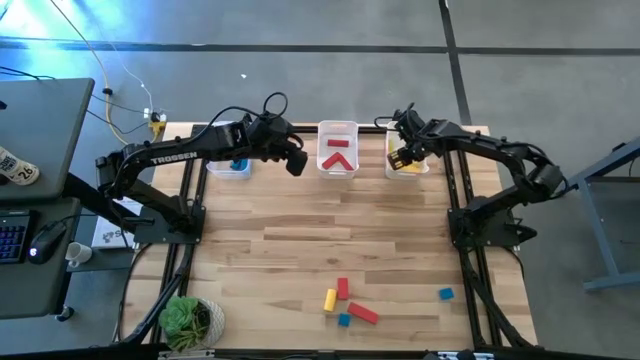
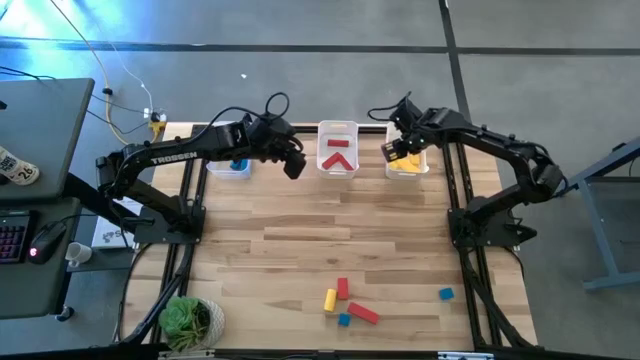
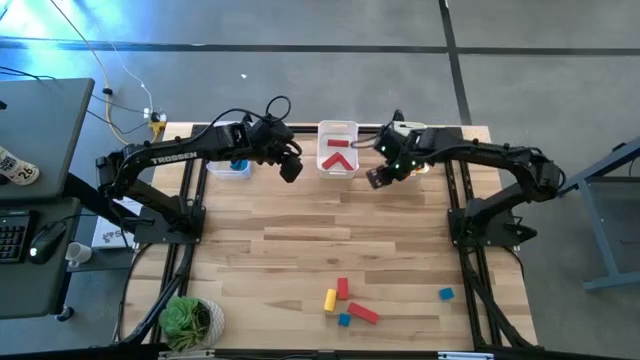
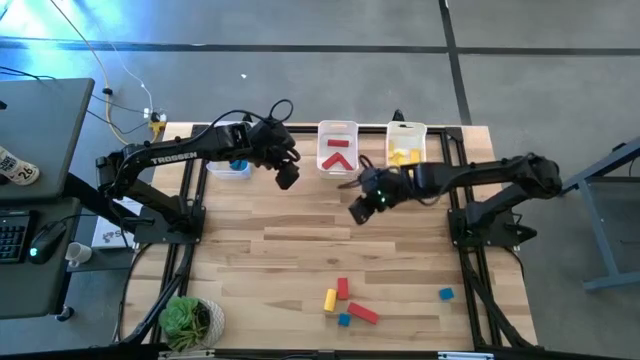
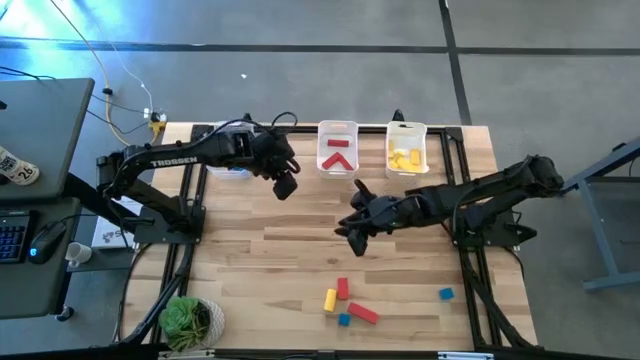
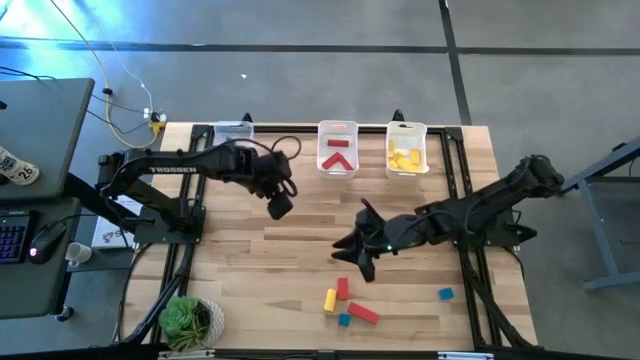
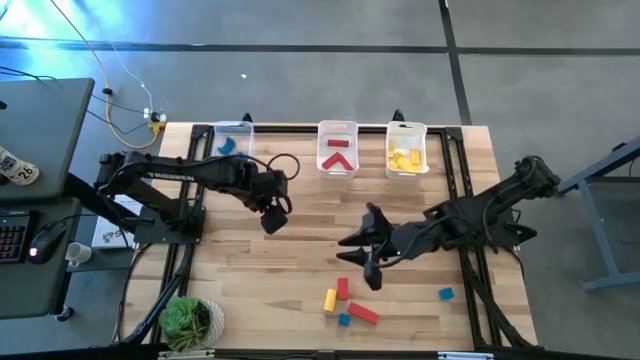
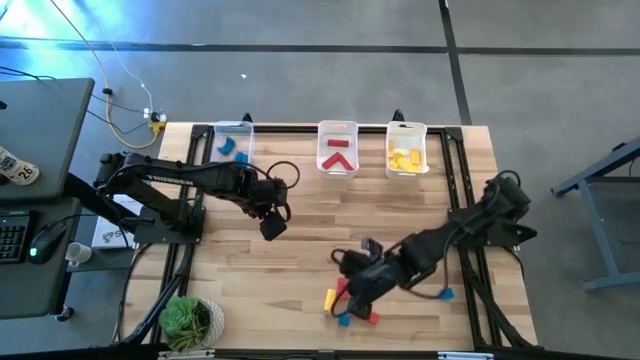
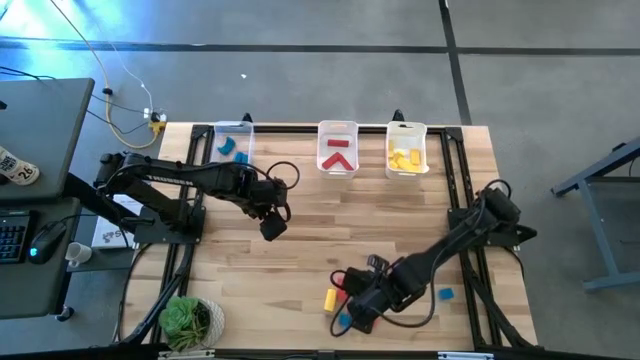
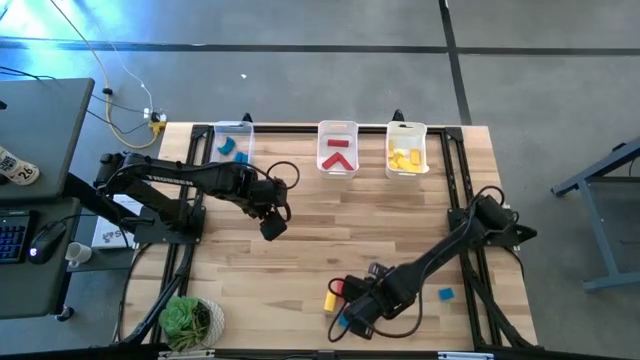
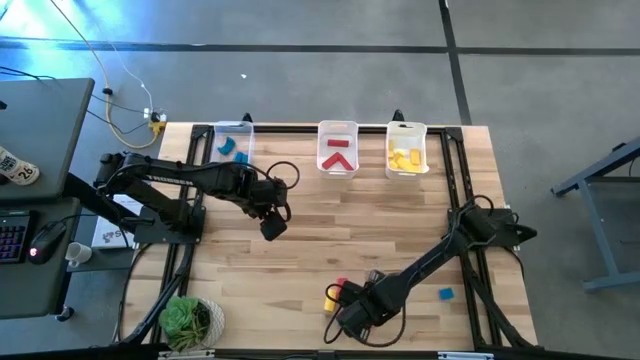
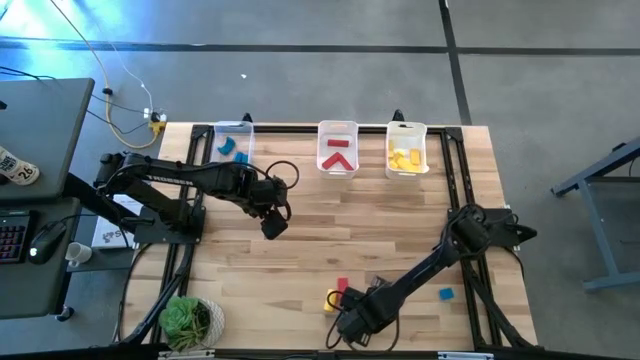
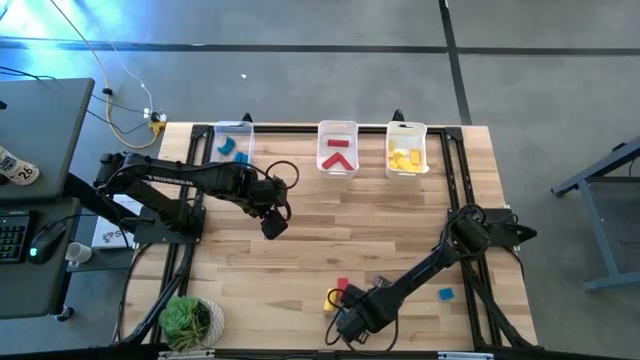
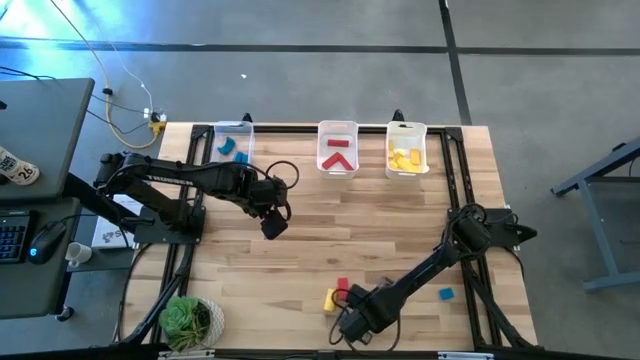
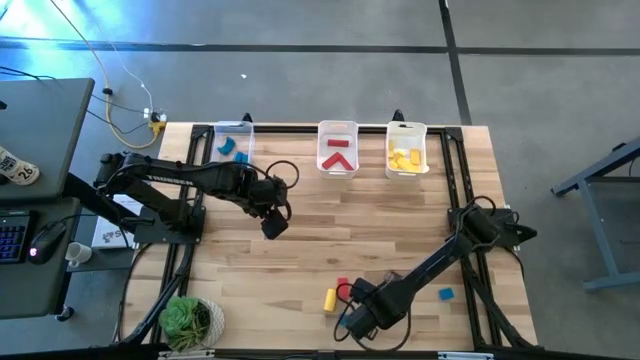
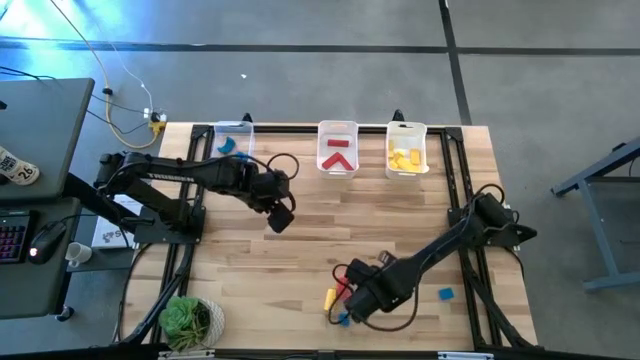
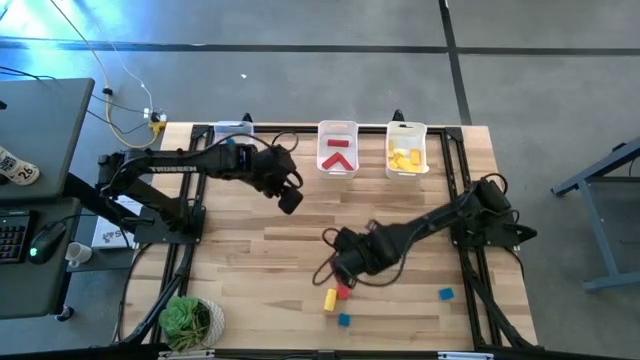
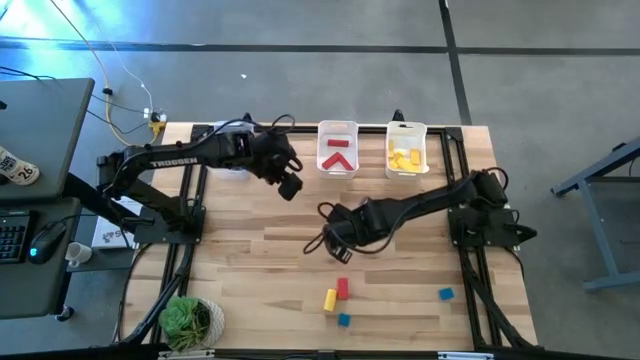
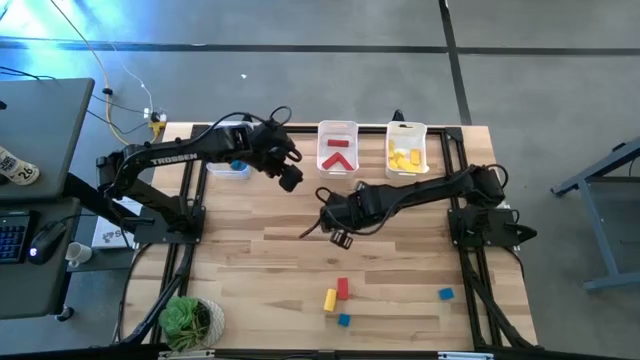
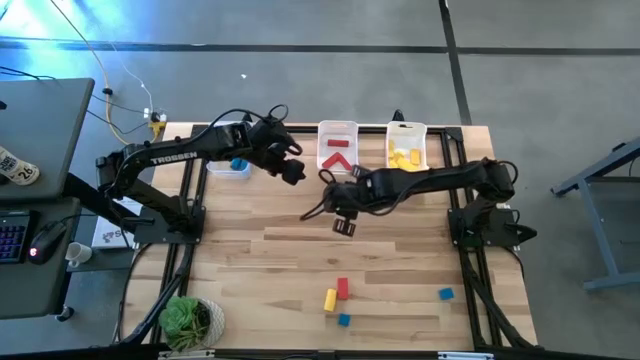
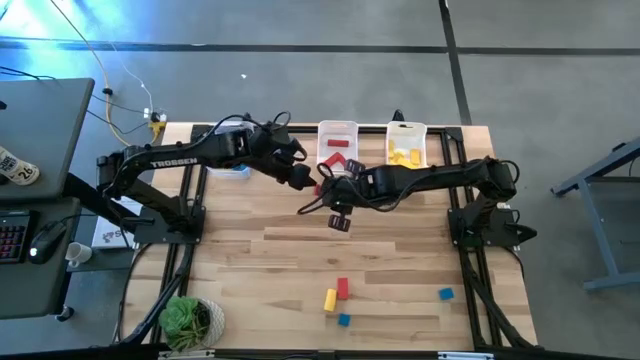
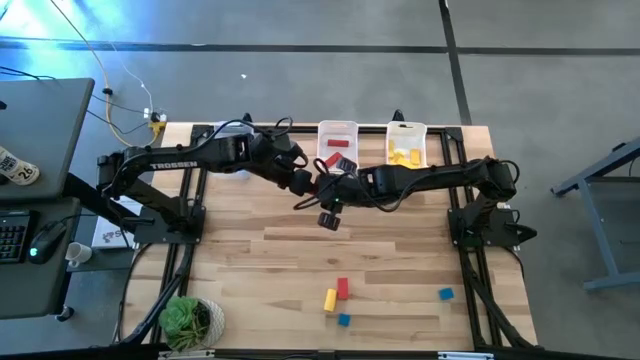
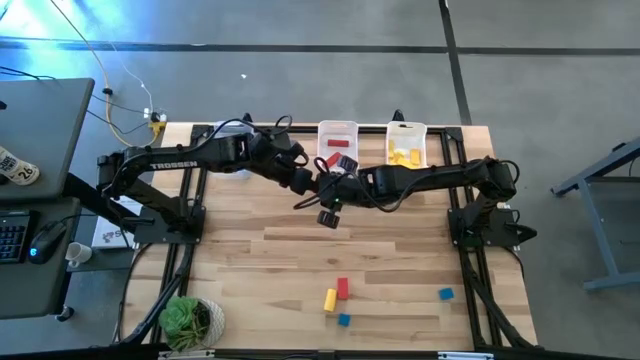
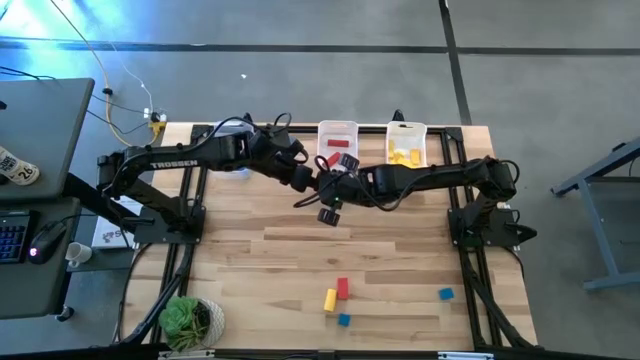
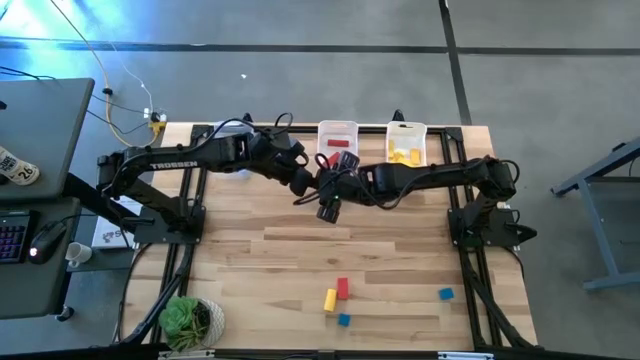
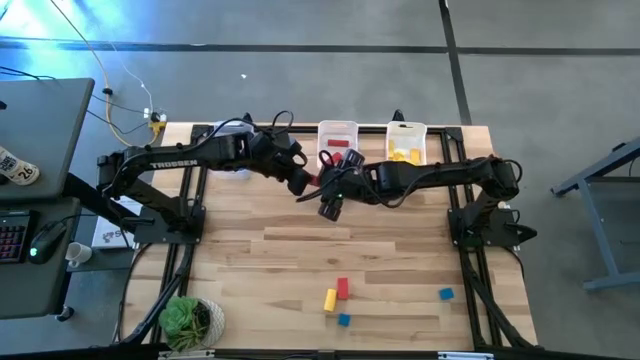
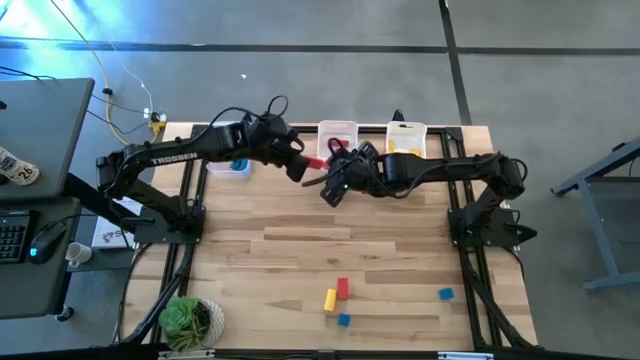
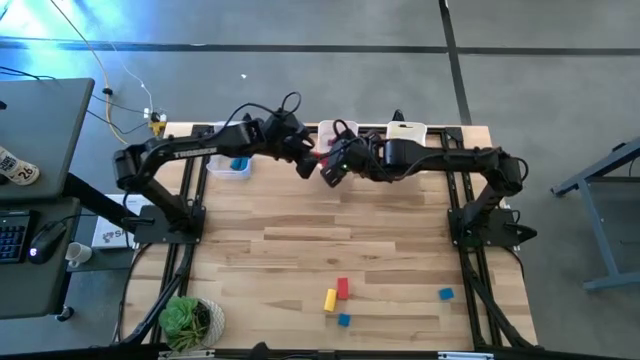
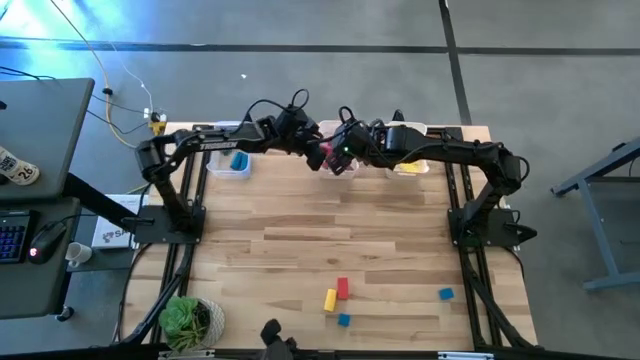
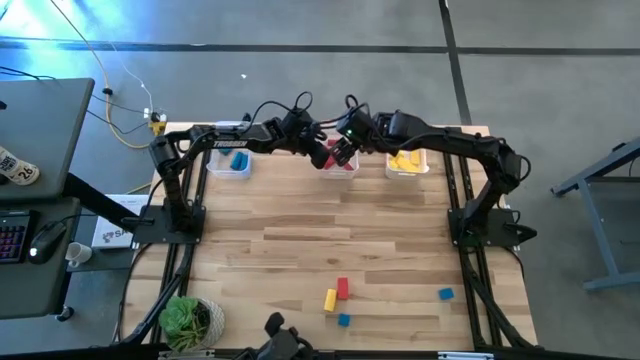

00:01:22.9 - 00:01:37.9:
Task: Sort & place blocks by color
Put the red block into the left white bin

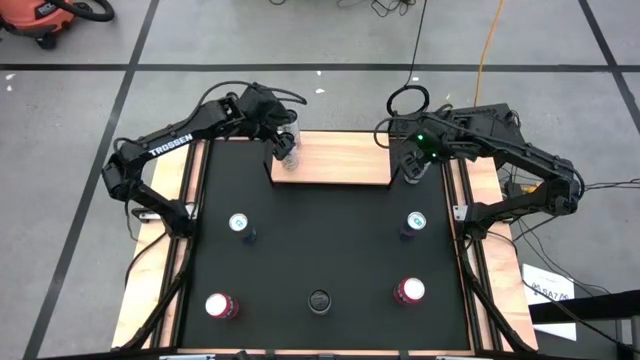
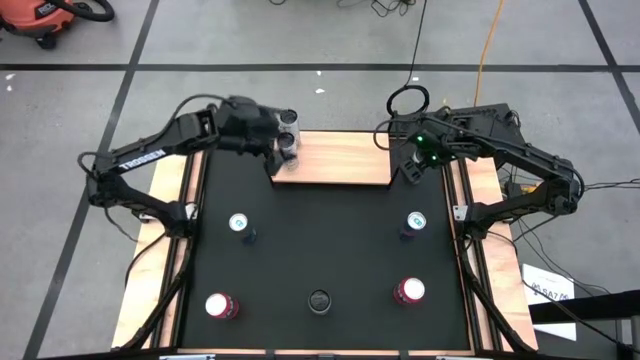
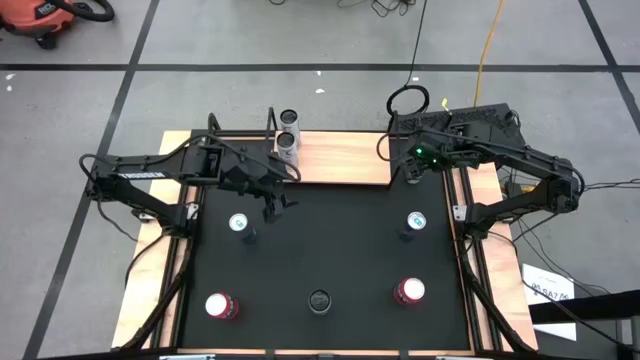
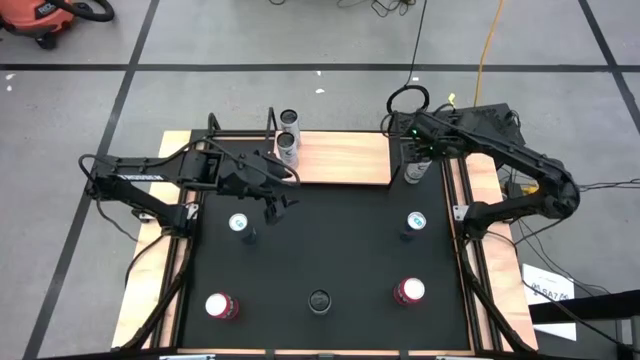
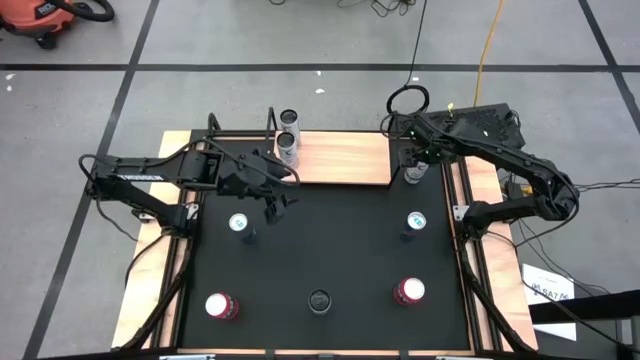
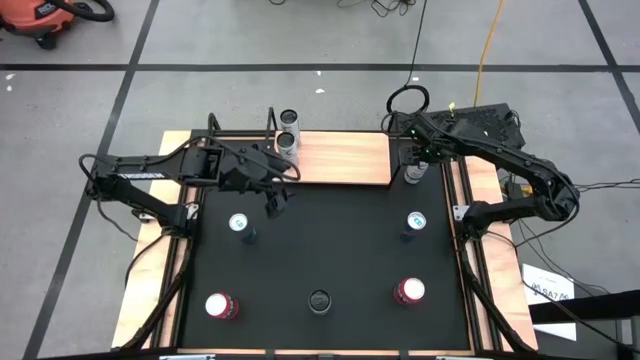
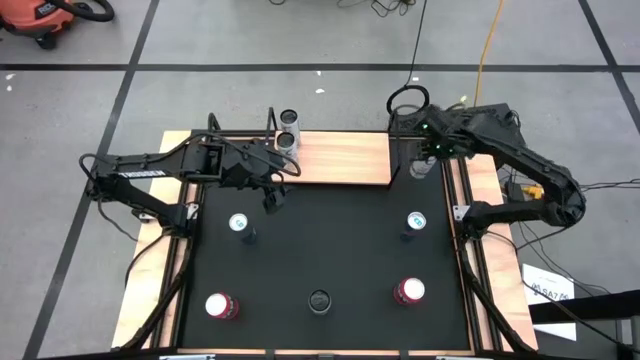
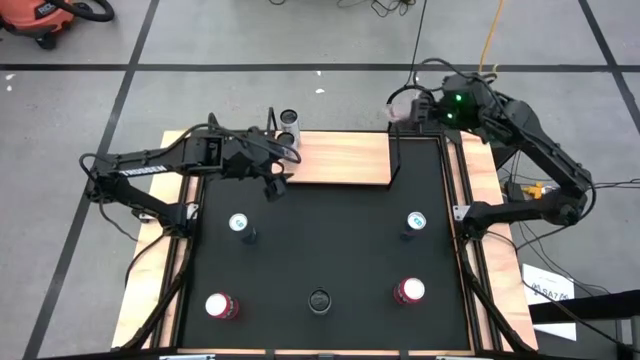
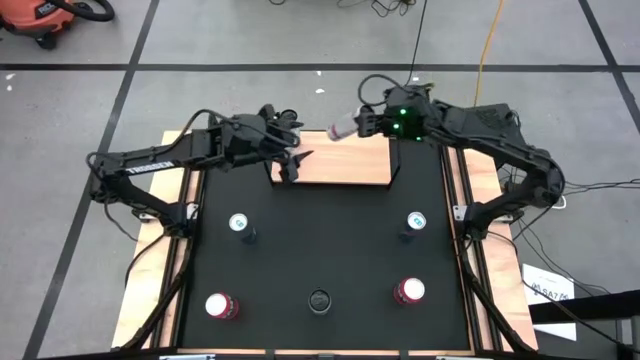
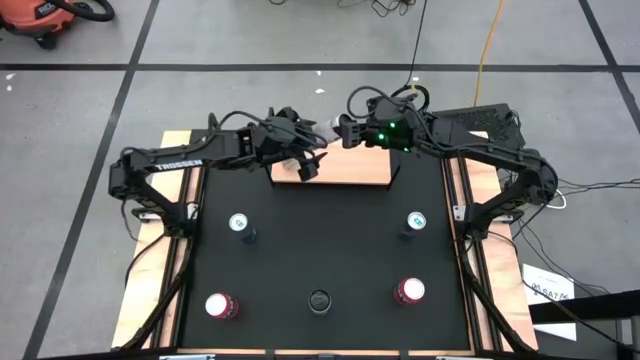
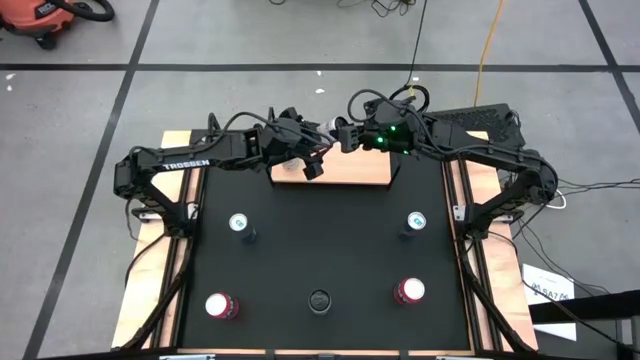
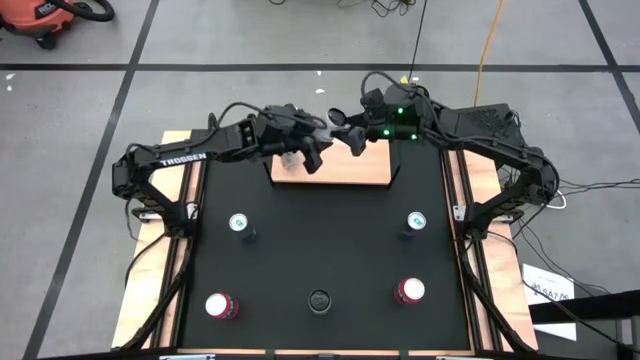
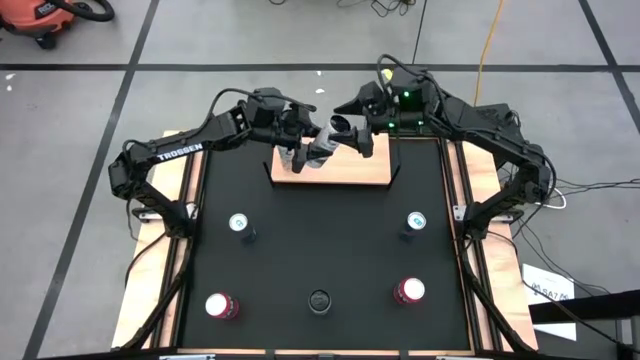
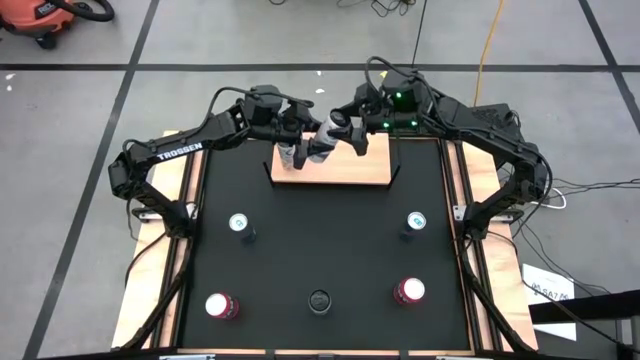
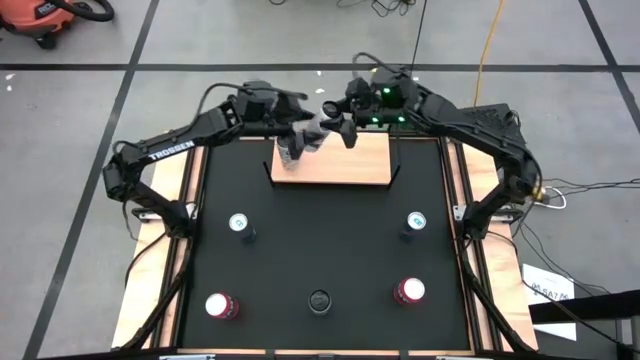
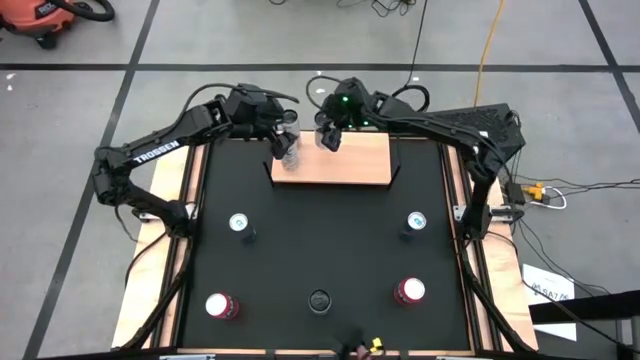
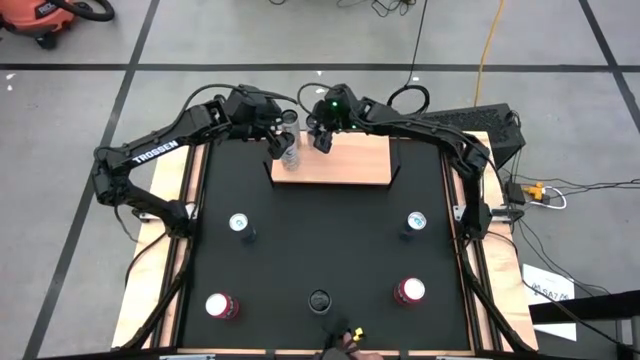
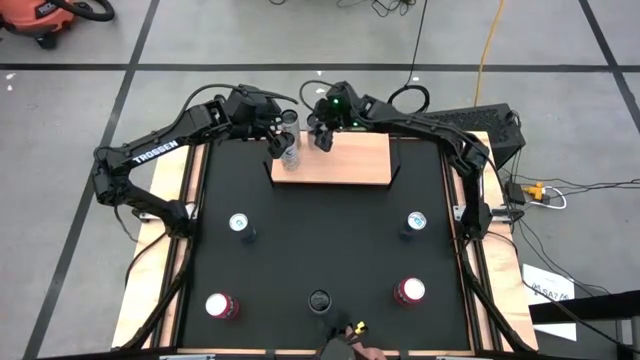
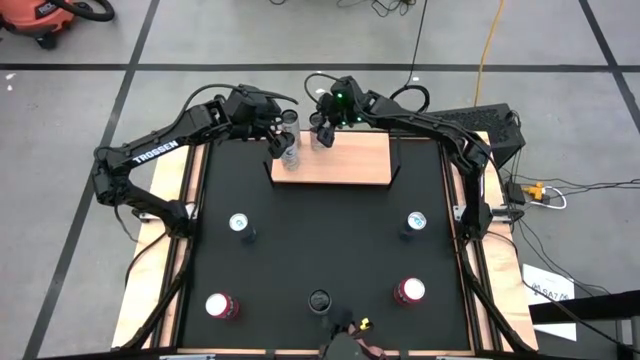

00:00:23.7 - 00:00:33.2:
Task: Place canned beverage on shelf
Put the top white-pink soda can on the shelf
